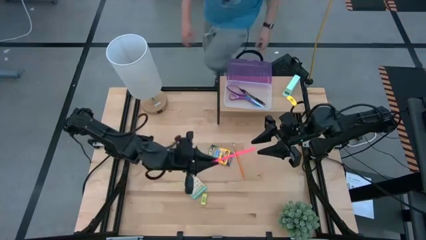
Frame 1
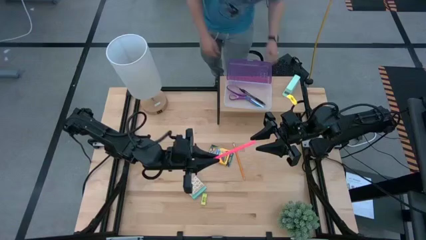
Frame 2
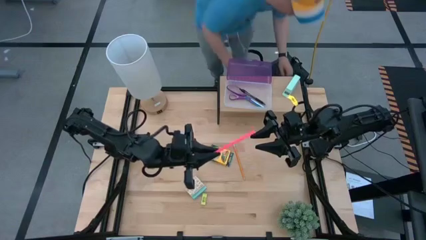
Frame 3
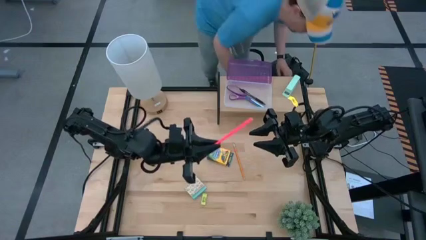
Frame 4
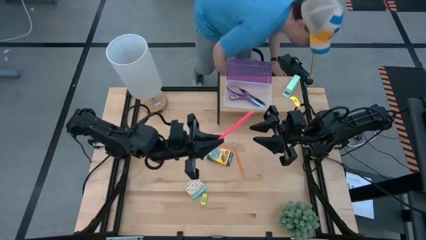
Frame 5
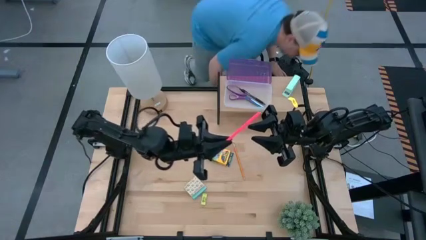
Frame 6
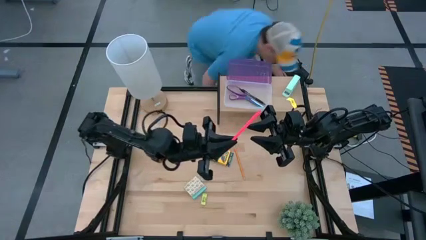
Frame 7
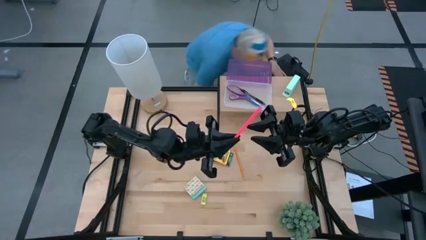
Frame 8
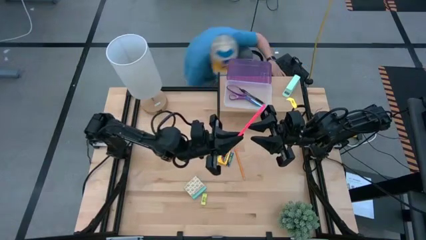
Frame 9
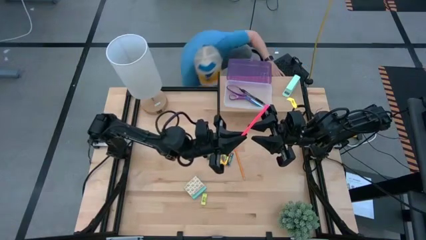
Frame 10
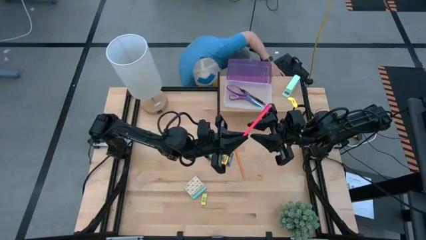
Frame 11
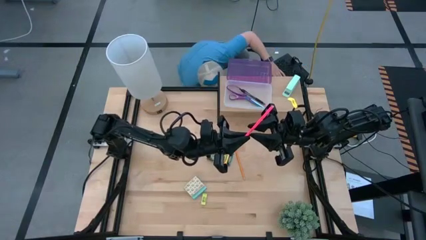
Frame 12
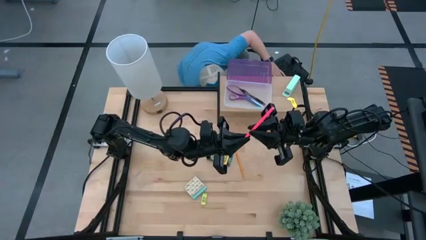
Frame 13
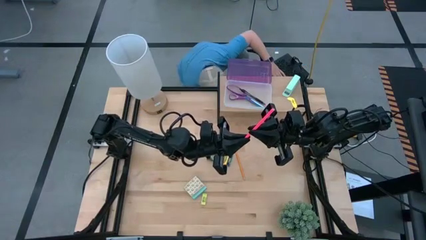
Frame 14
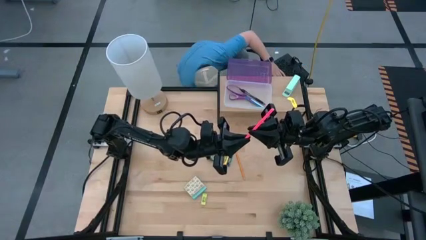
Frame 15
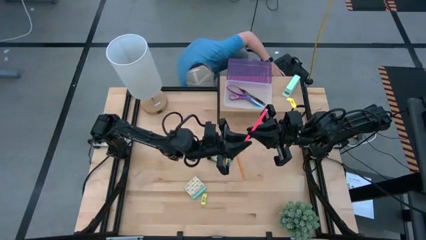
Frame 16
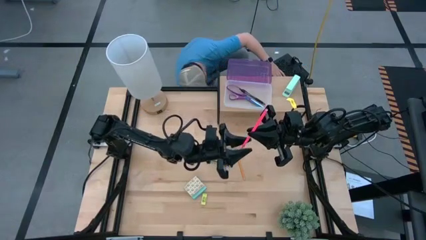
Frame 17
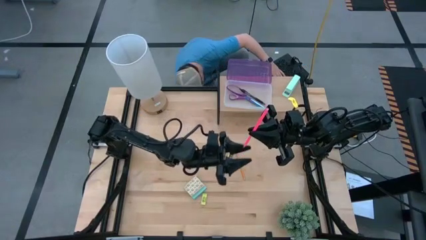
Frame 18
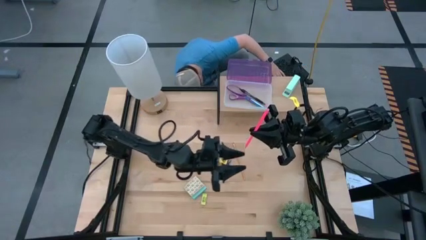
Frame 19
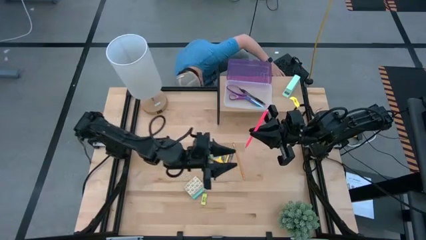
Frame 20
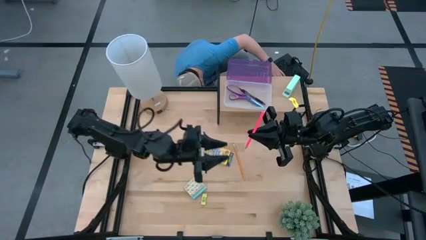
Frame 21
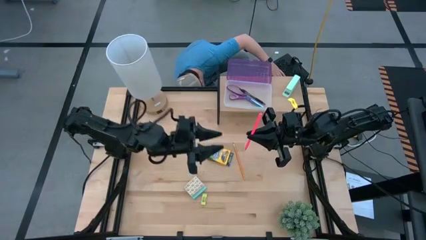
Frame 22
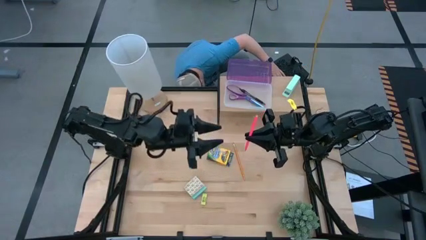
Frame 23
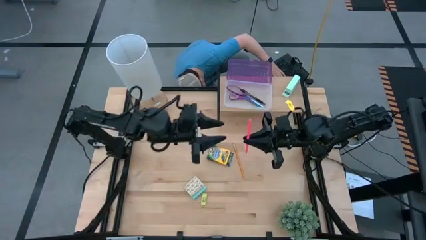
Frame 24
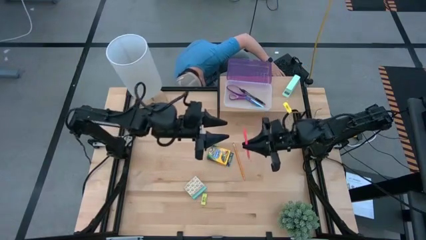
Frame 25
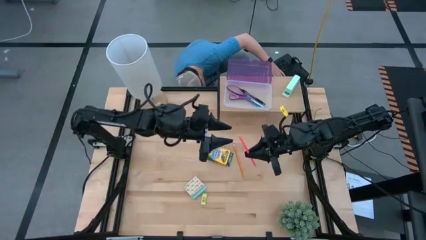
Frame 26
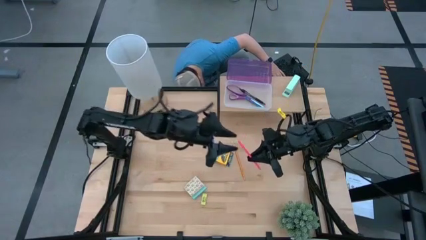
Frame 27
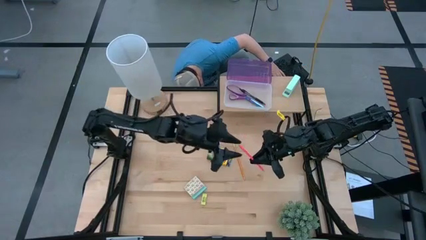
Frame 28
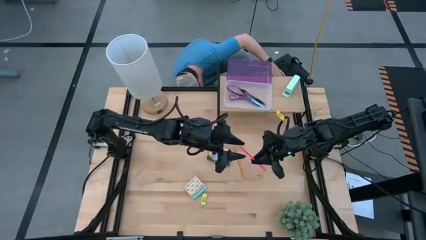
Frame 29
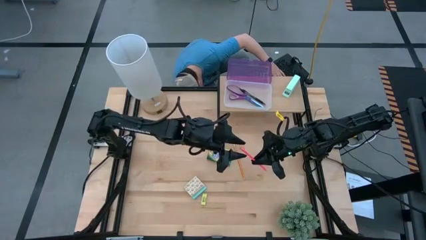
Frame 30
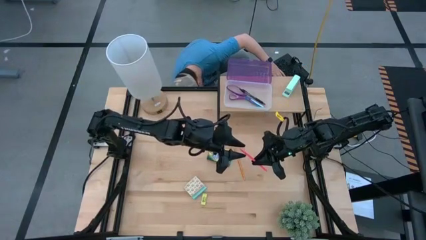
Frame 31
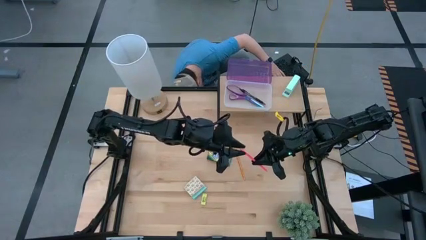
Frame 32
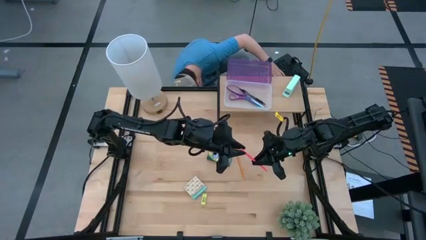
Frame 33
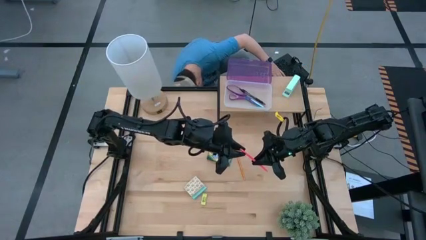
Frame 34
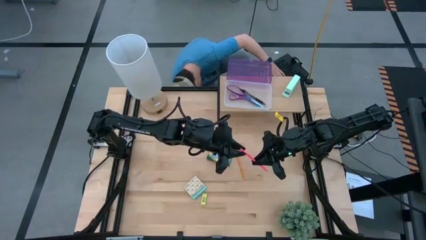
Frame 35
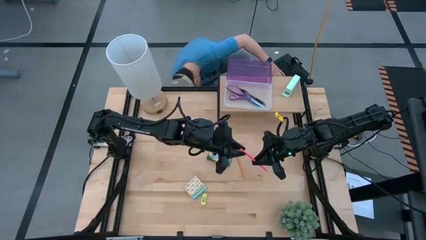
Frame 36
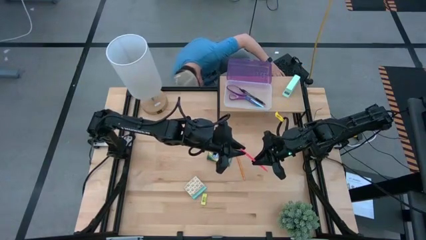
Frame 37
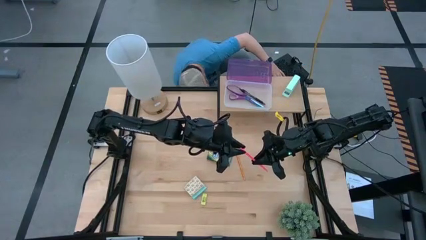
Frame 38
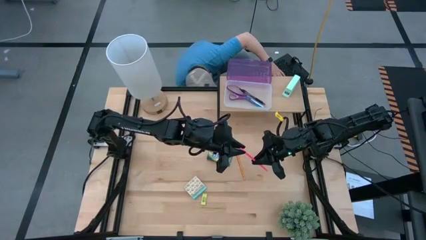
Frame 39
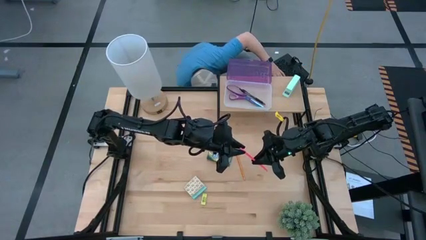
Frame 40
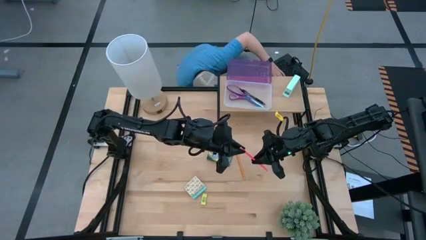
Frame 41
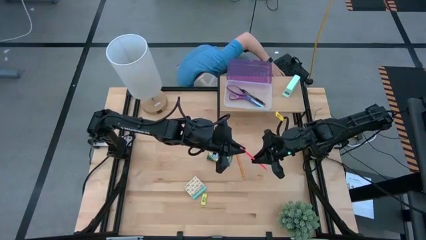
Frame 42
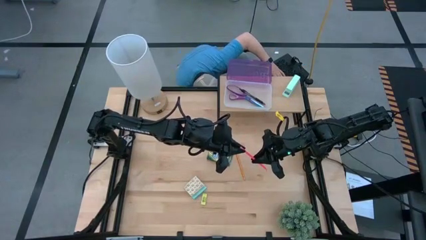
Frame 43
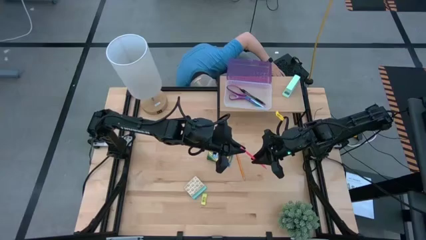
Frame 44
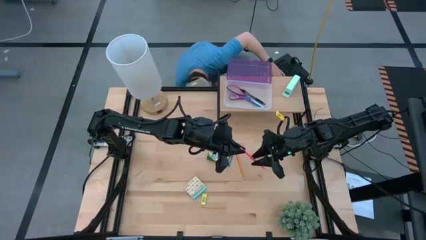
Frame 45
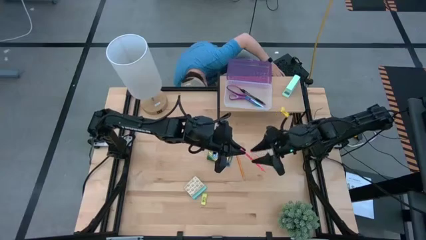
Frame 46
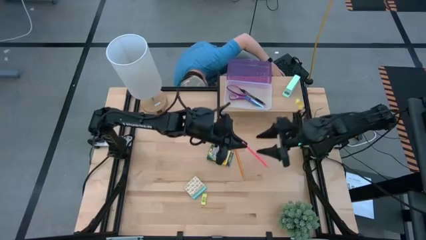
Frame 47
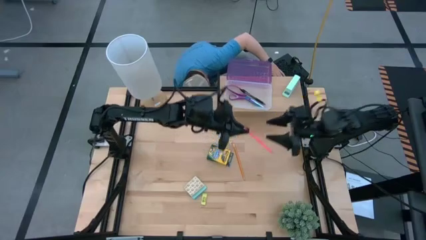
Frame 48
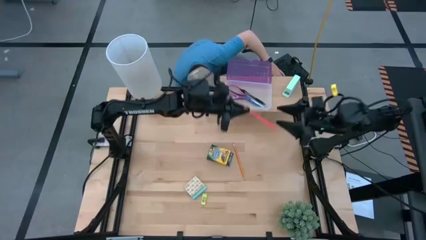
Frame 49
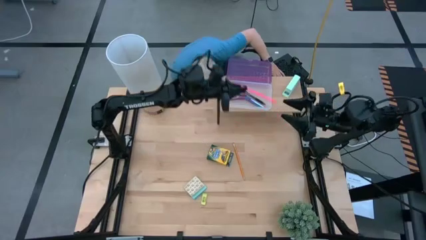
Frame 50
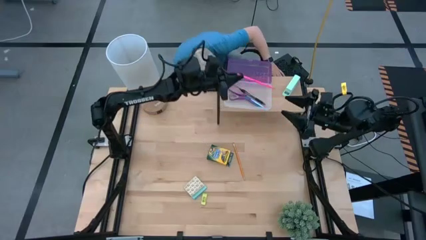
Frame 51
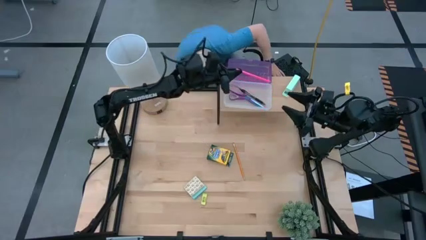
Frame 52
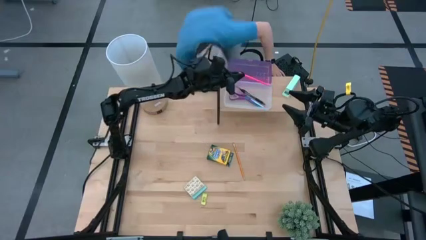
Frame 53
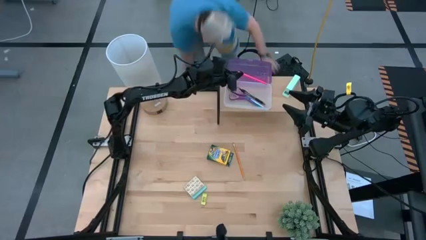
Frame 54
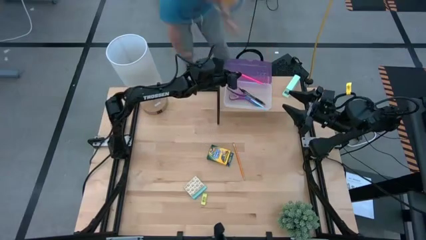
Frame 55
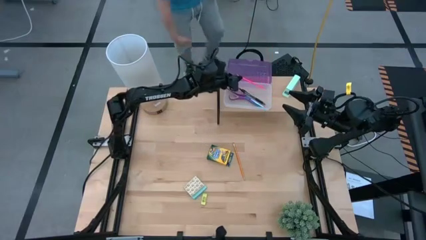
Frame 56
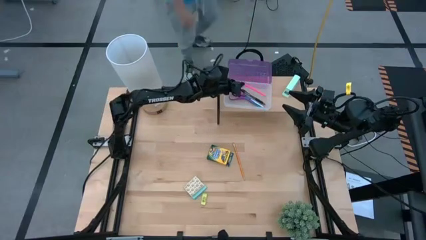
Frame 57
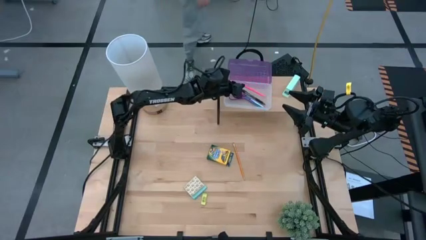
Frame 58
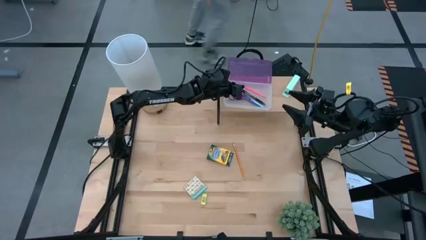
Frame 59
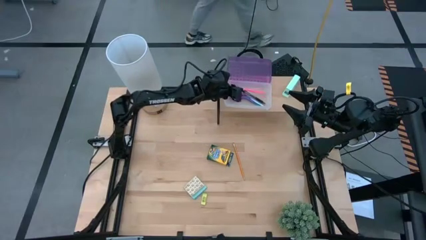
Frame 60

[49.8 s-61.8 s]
Task: Pick & place school supplies into a supply box
Put the pink pencil into the purple supply box on the shelf

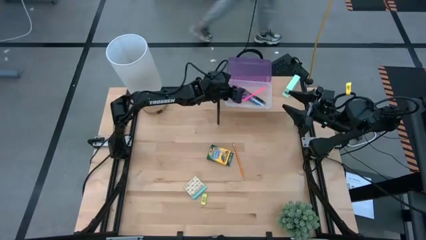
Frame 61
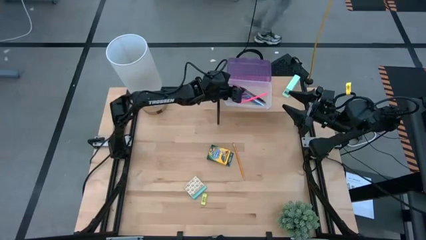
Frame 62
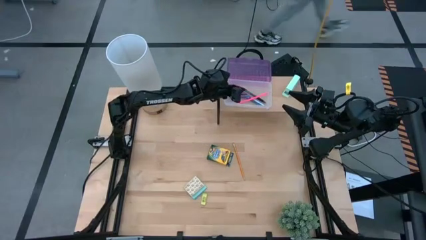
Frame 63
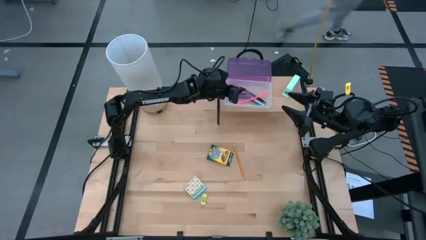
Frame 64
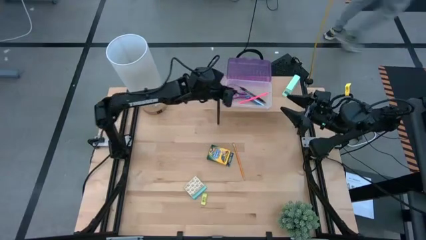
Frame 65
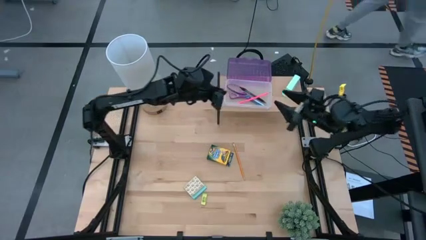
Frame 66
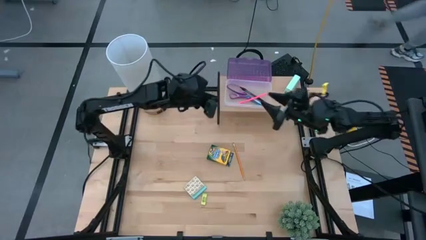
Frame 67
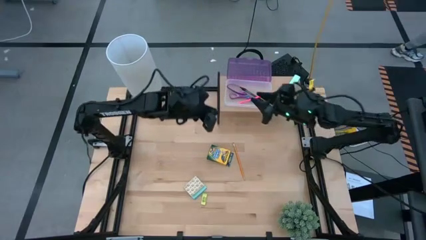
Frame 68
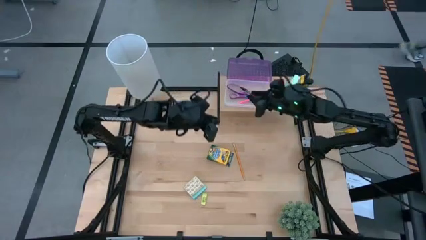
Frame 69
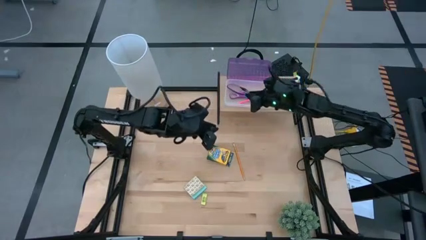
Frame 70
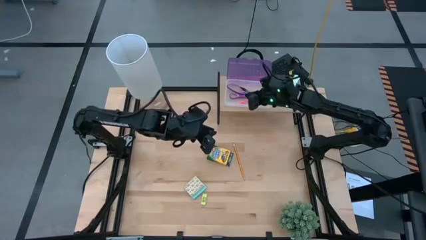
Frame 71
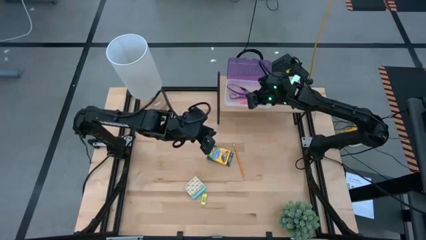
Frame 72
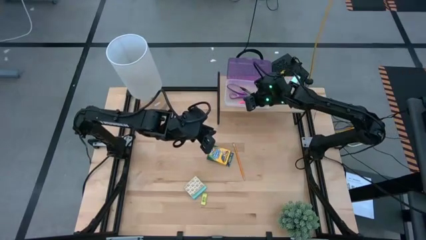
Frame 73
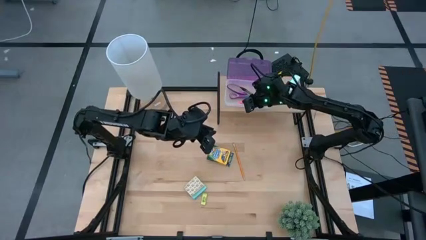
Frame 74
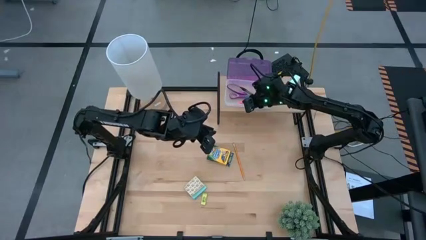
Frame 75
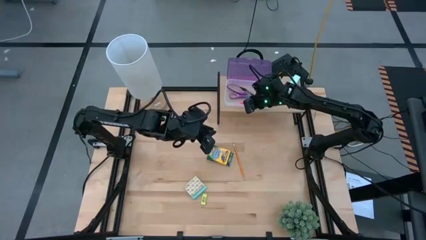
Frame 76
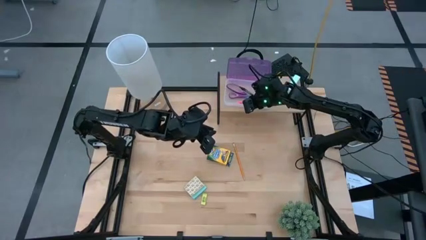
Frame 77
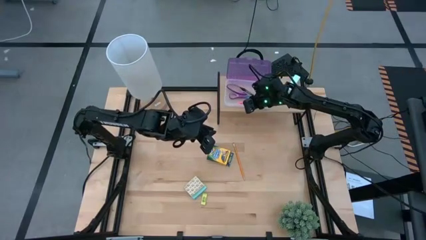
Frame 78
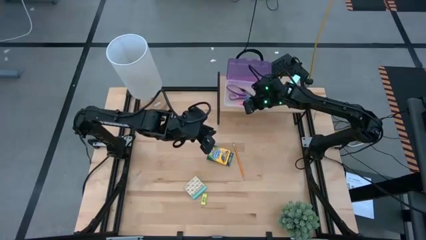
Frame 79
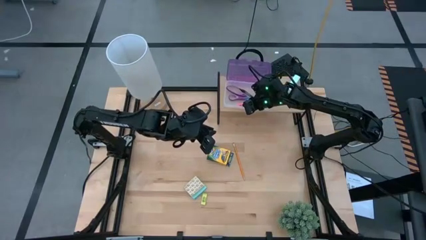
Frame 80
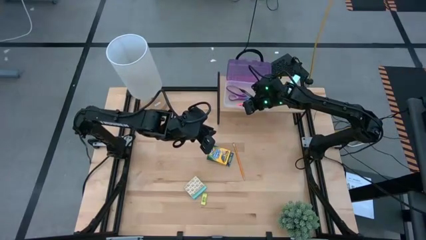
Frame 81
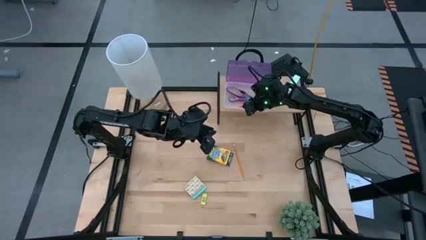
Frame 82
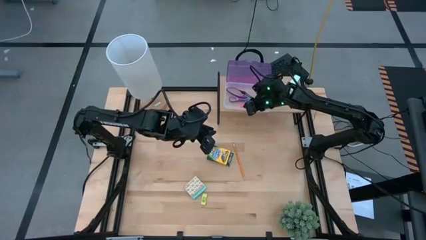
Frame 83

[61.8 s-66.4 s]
Adjust the purple supply box on the shelf
